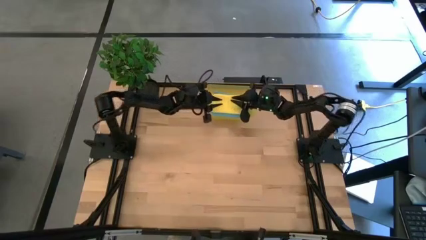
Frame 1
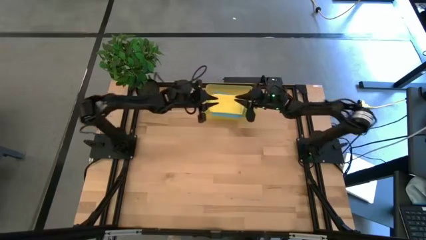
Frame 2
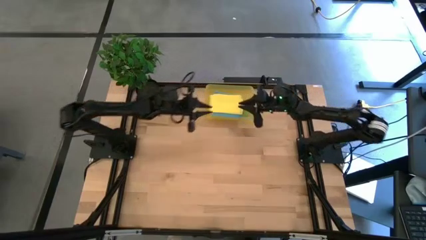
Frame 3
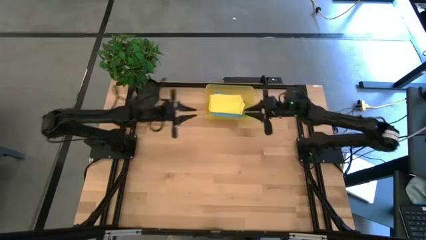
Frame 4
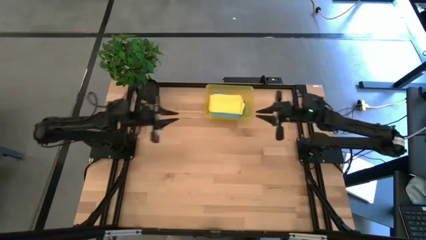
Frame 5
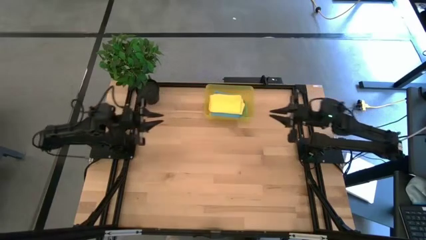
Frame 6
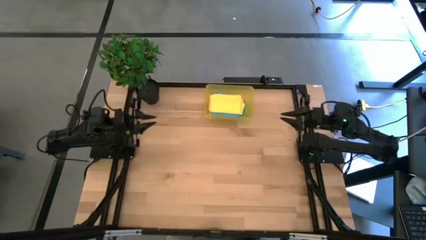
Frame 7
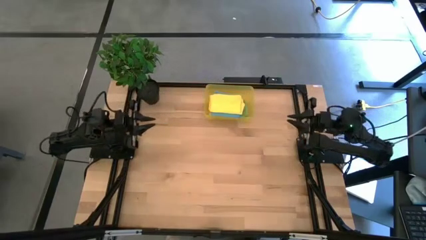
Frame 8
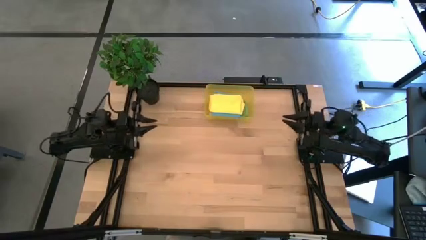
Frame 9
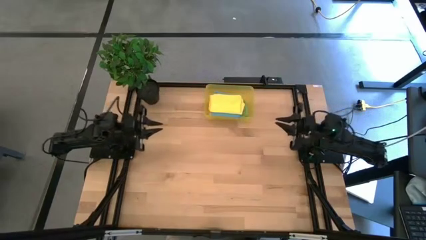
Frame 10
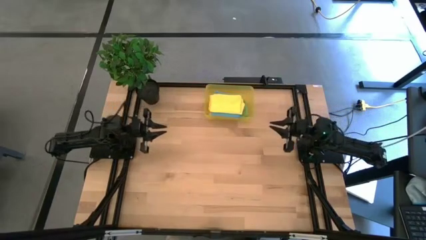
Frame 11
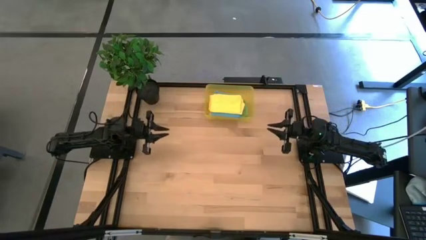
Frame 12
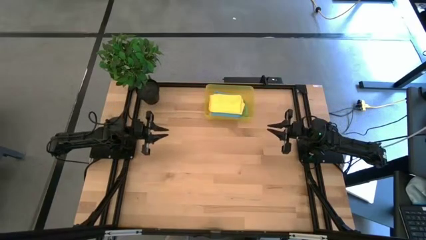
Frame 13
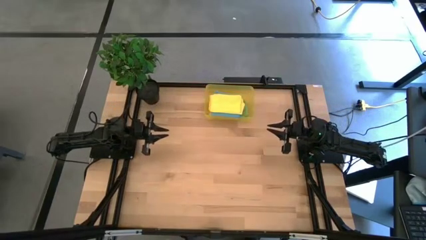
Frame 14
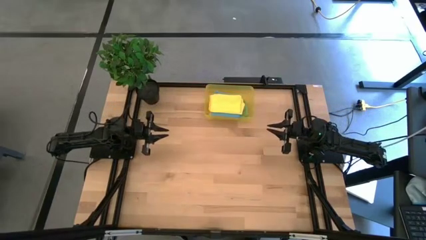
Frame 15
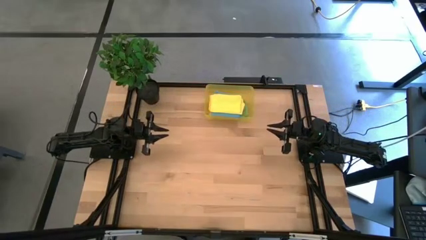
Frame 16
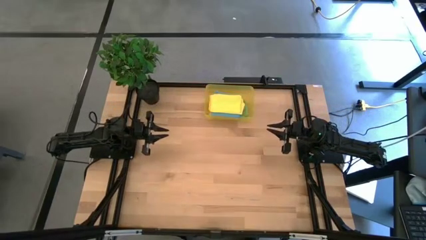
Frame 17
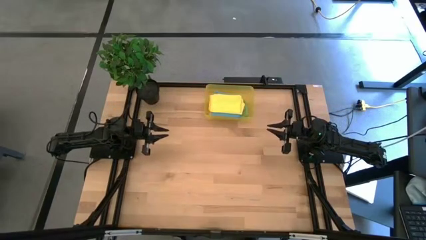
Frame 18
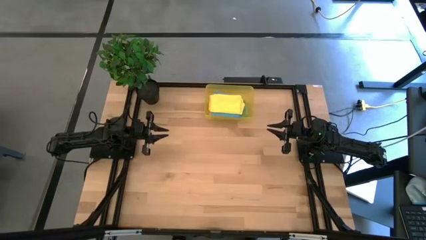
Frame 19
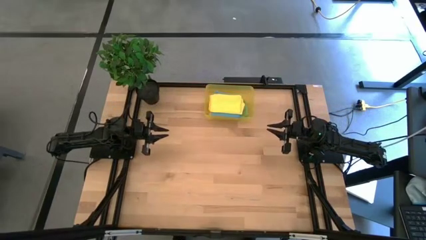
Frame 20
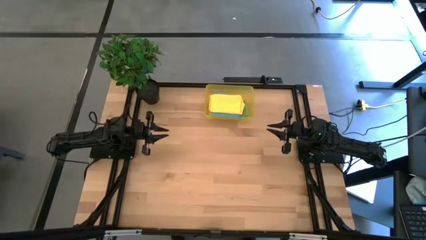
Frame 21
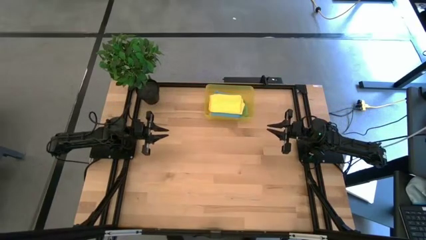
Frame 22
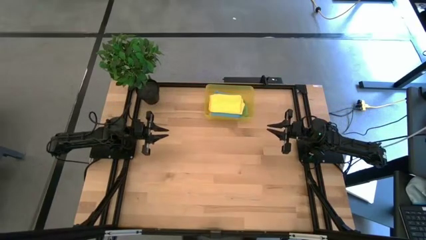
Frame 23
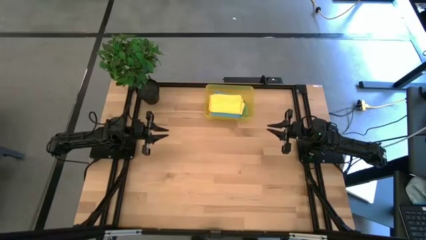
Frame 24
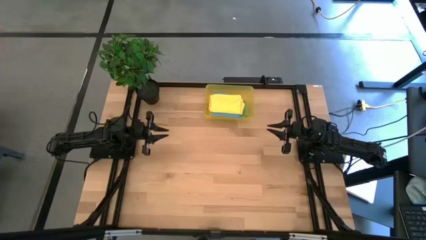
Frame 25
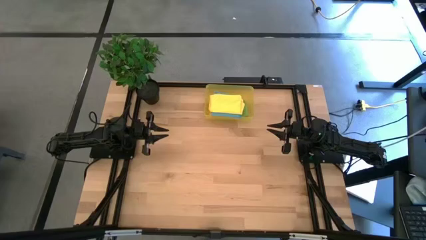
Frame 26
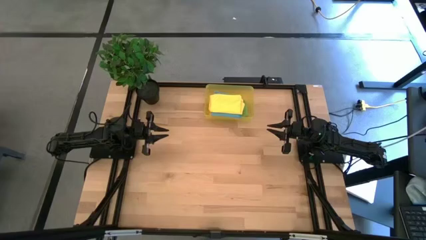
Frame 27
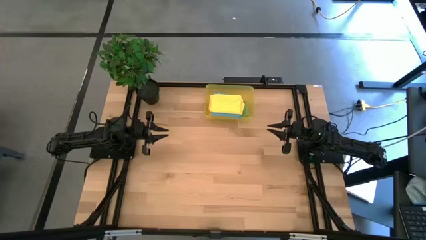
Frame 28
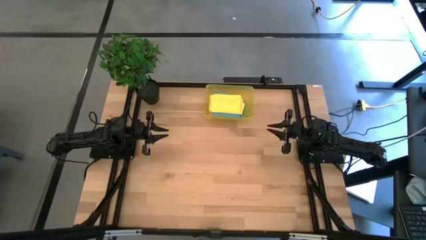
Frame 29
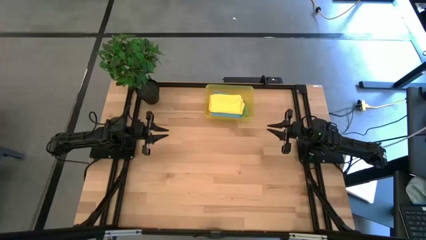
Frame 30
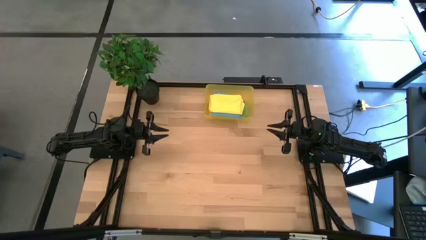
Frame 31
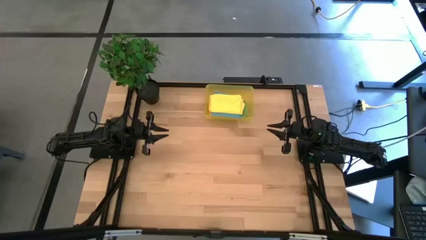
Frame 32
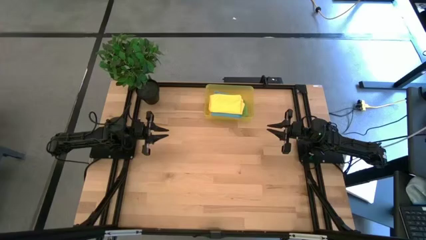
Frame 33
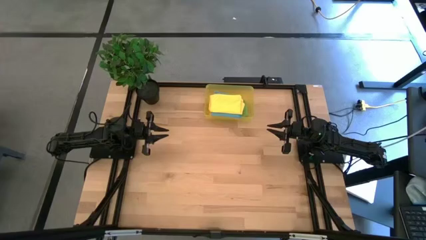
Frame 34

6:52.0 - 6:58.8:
Task: Fold microfiber towels
Return to Home Position

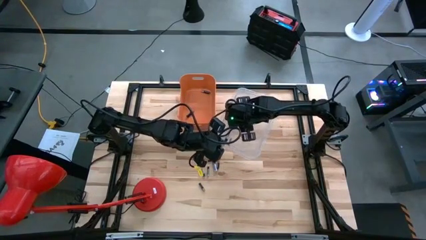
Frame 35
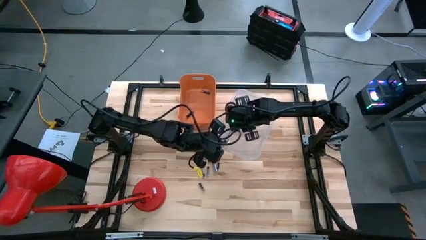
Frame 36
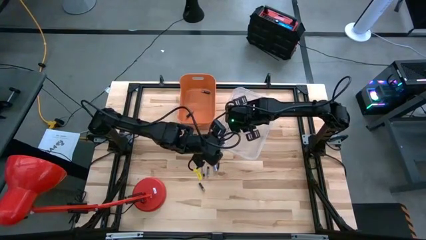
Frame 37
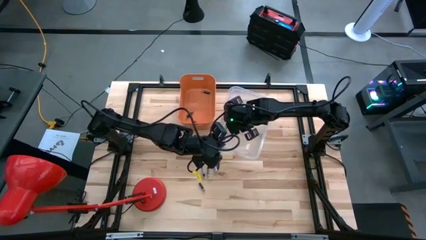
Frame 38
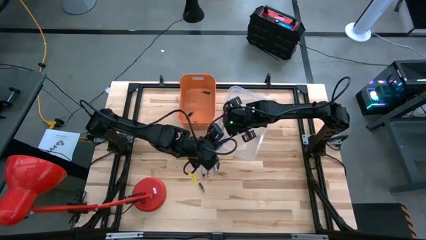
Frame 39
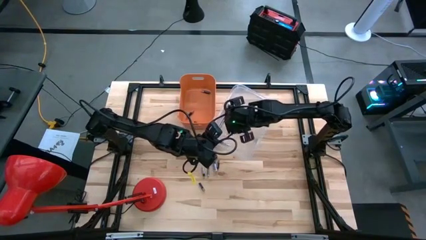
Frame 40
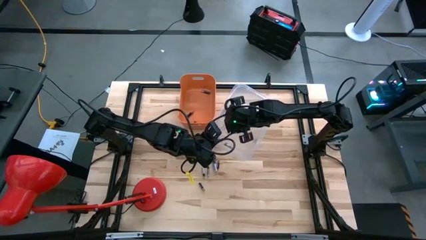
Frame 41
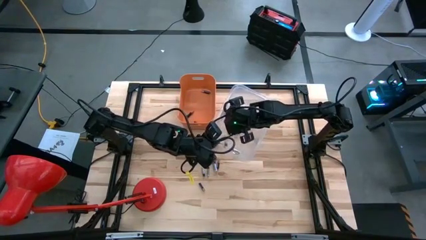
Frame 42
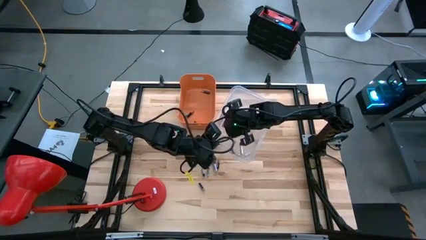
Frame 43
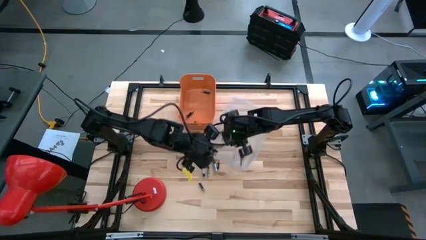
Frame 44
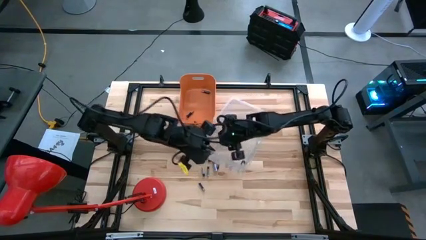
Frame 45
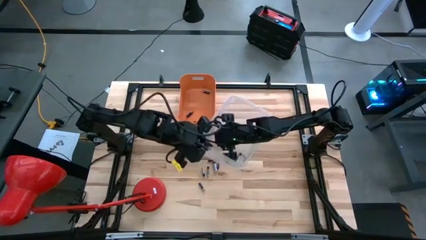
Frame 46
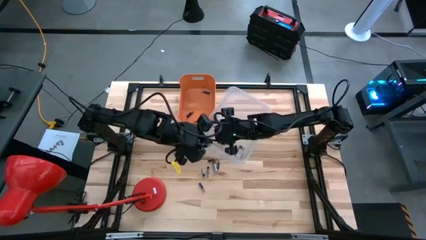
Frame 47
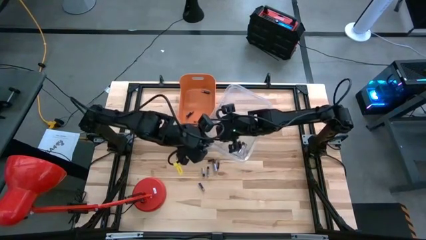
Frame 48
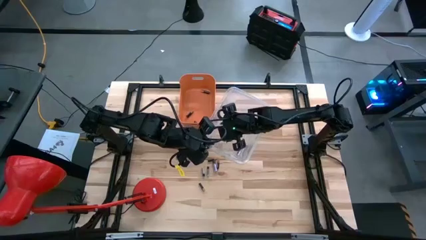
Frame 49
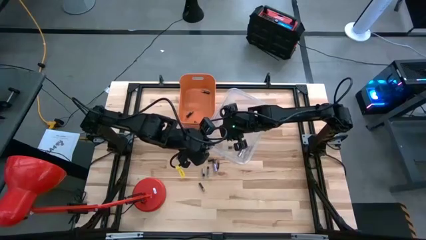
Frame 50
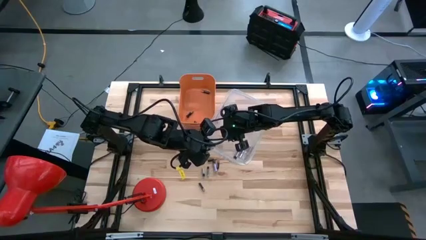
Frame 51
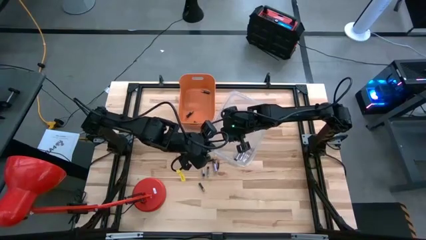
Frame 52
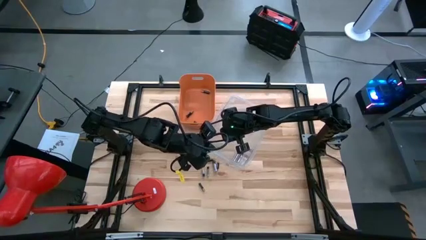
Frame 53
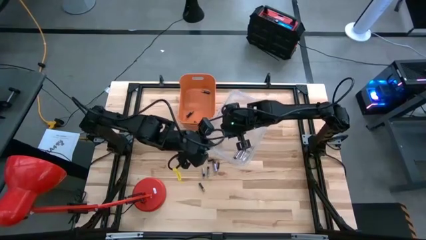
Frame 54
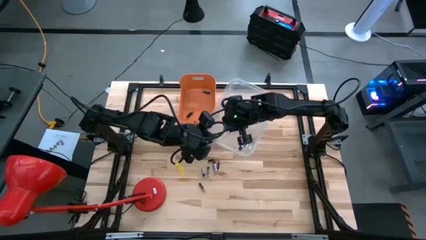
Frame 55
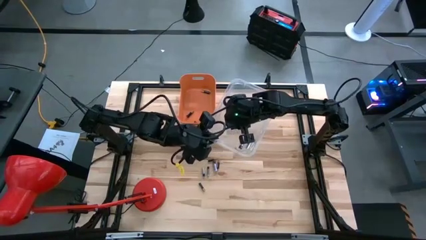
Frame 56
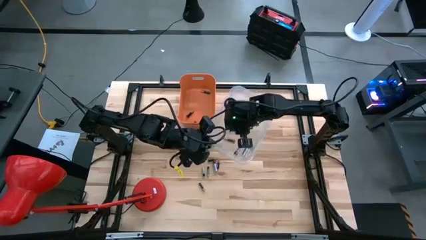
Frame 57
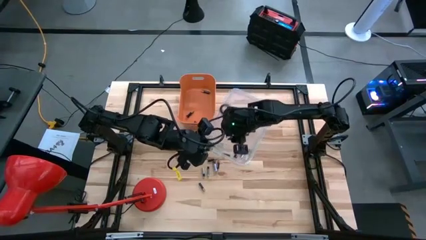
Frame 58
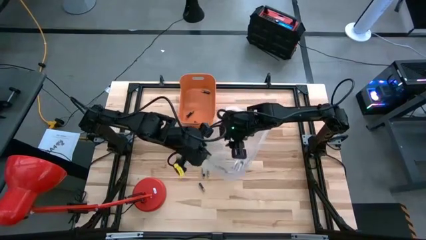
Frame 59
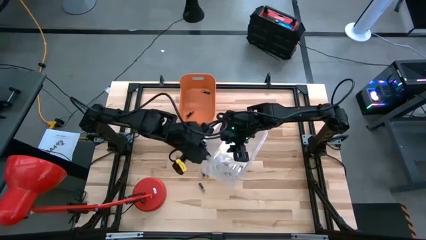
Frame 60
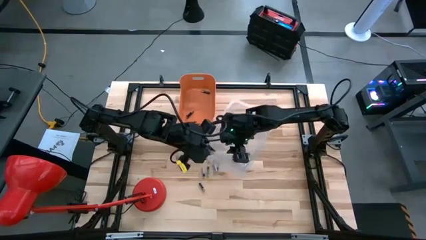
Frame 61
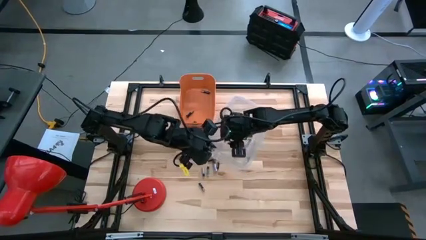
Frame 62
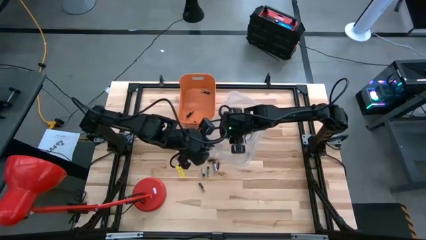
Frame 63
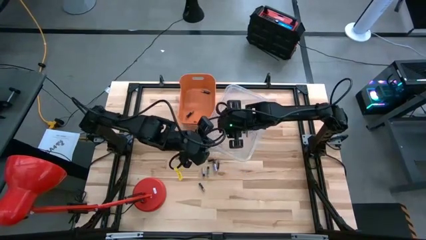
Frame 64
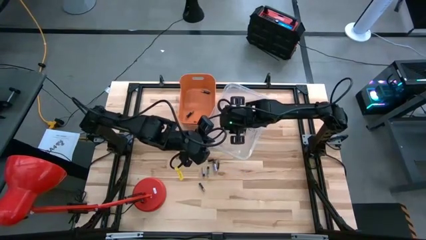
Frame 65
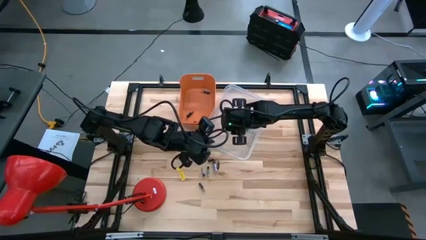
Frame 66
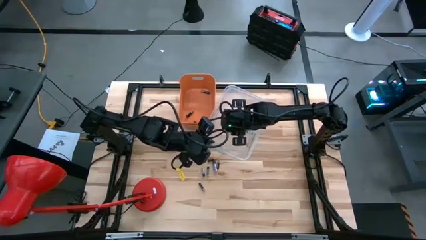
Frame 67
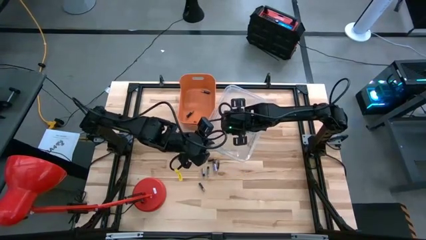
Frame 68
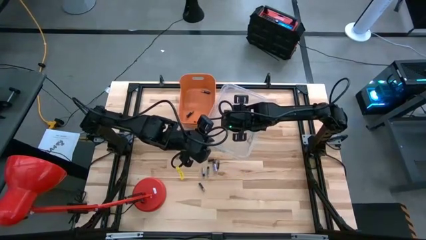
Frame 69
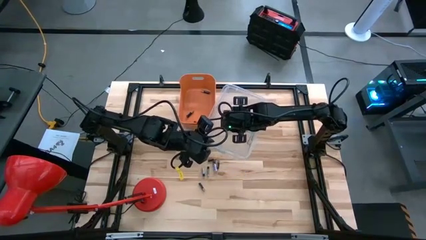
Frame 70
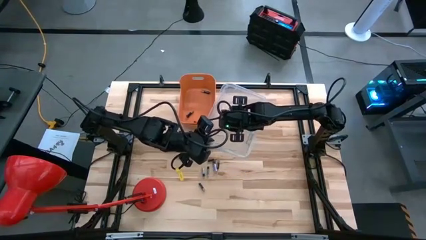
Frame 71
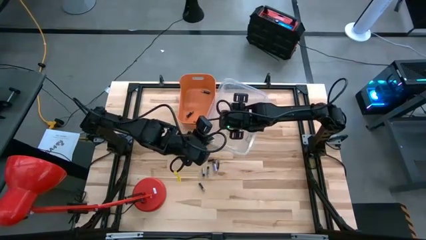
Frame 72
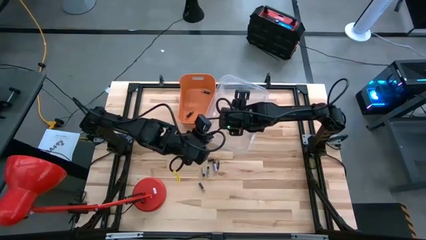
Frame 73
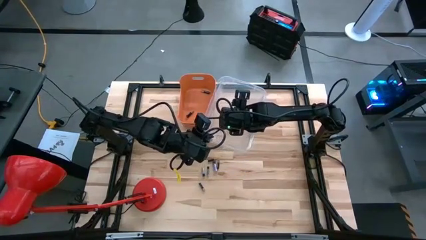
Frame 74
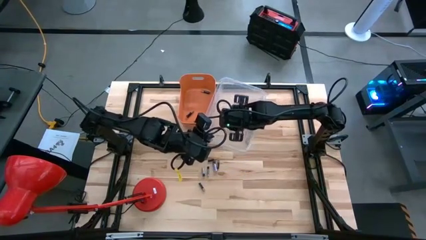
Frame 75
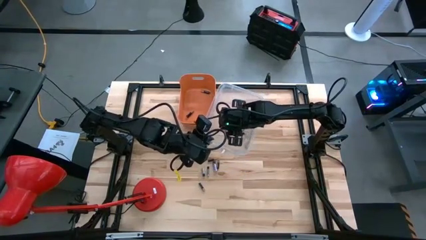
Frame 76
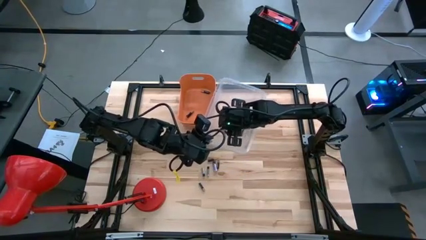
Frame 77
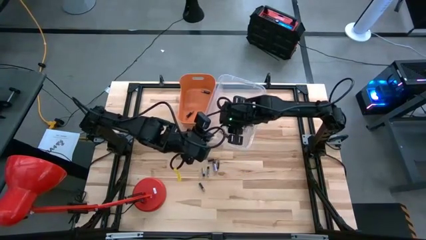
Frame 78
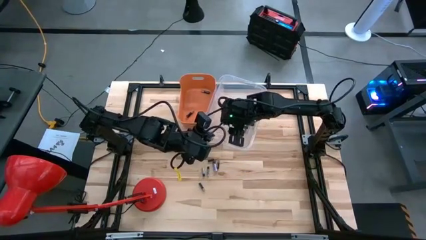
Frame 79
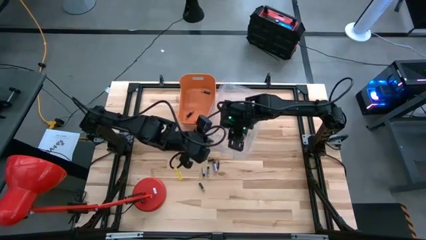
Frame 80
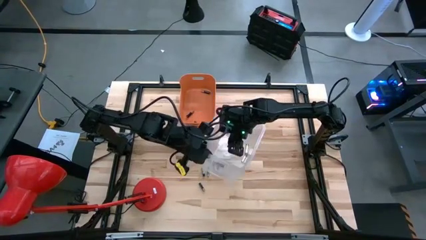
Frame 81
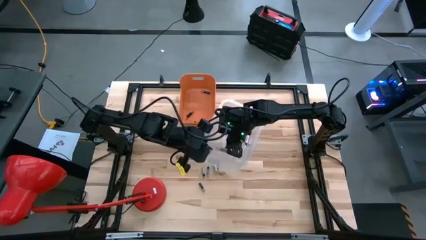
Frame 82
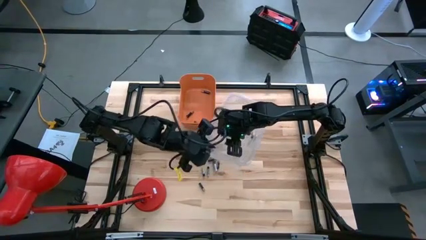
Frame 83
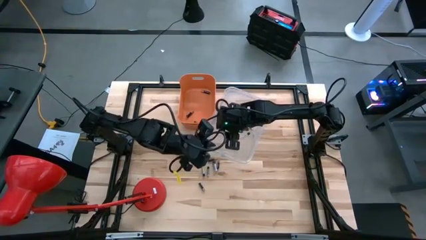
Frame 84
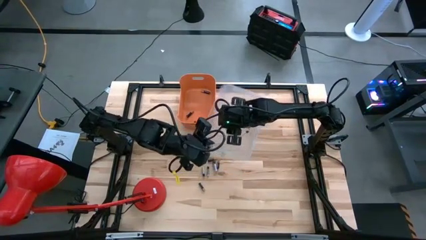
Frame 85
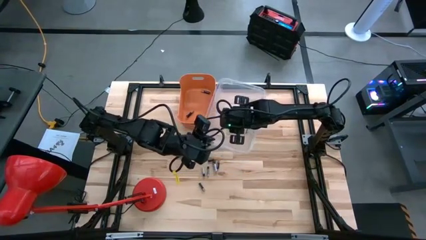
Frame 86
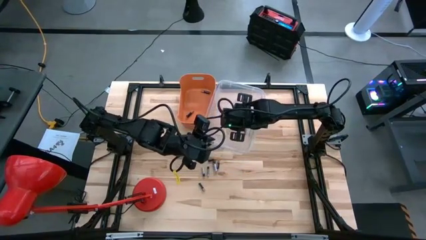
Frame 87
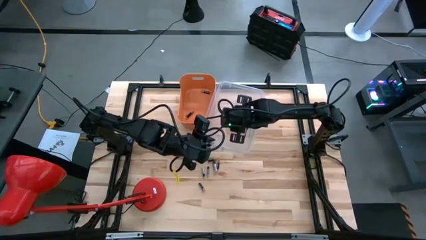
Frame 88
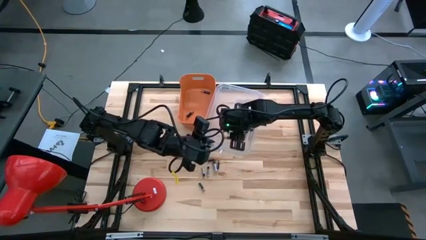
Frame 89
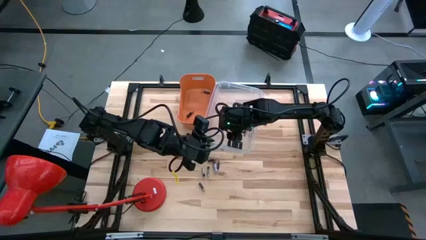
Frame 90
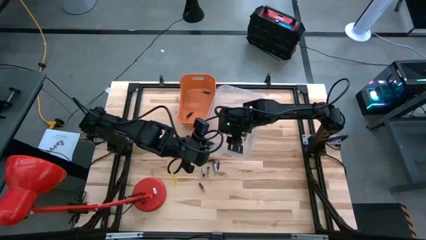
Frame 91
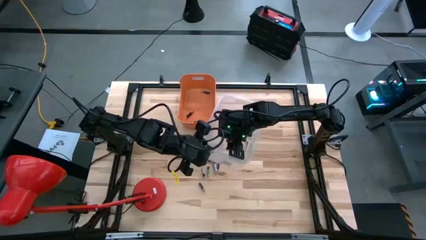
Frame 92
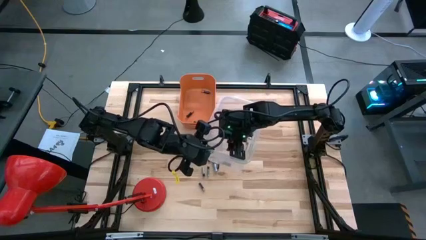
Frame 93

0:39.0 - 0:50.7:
Task: Sort batteries
Put the brown battery into the orange bin
